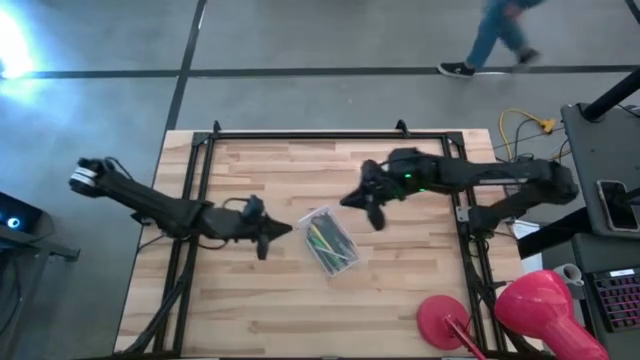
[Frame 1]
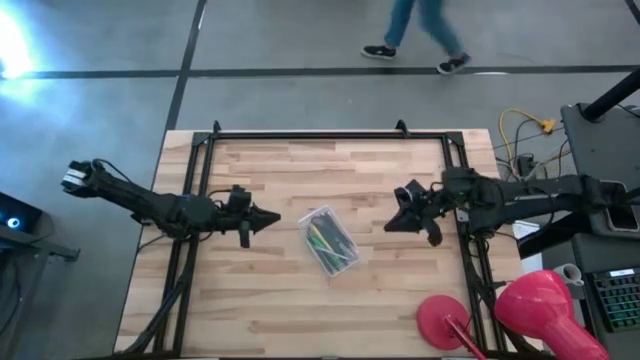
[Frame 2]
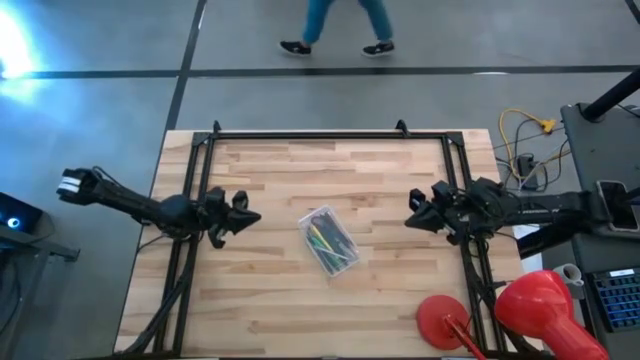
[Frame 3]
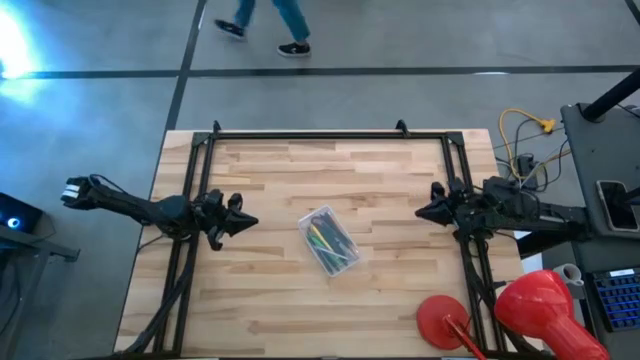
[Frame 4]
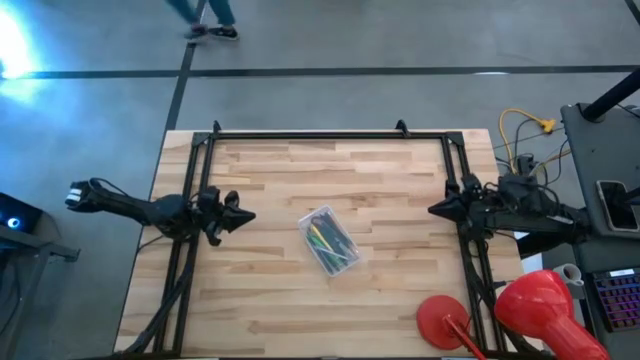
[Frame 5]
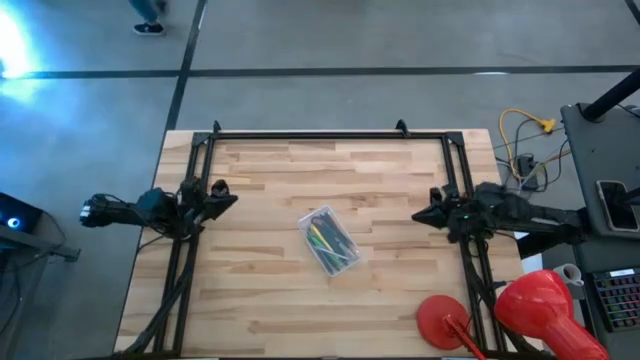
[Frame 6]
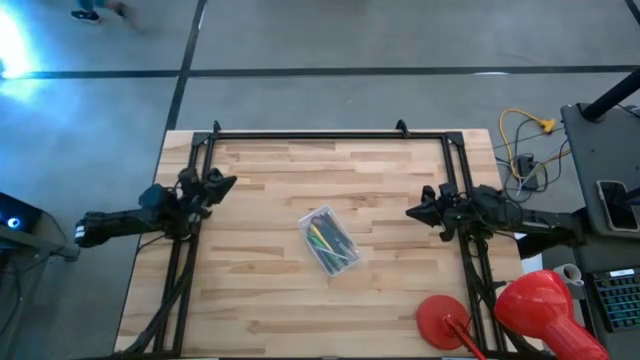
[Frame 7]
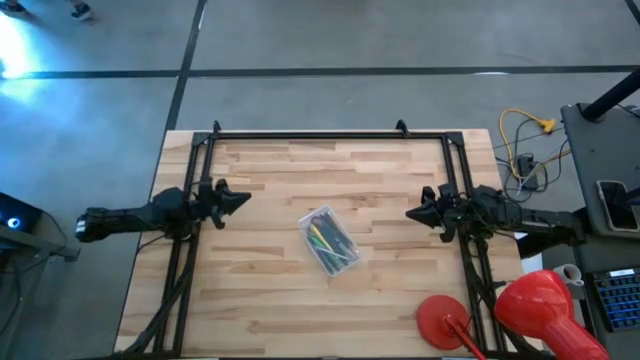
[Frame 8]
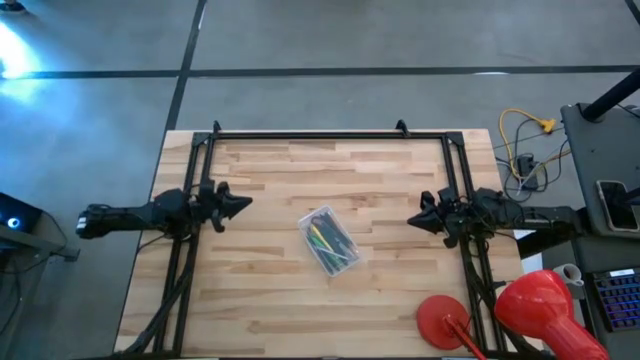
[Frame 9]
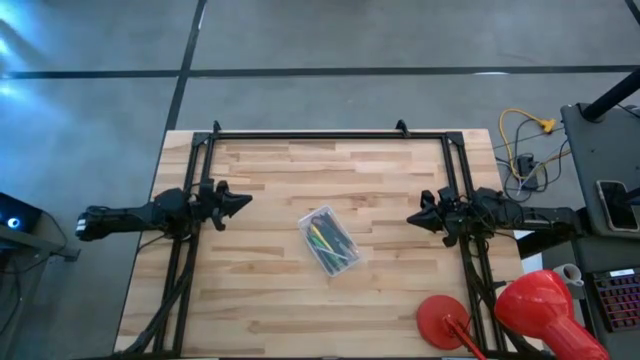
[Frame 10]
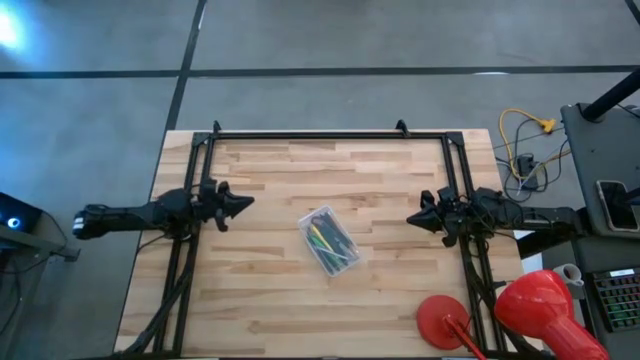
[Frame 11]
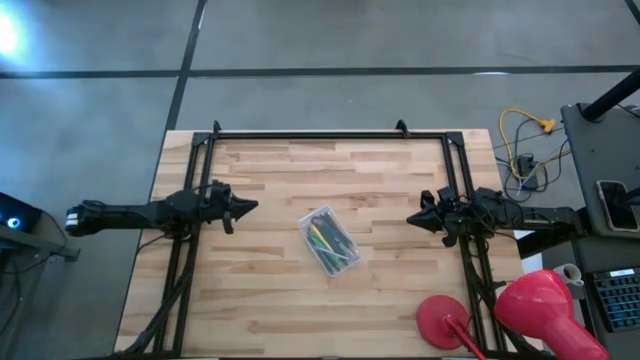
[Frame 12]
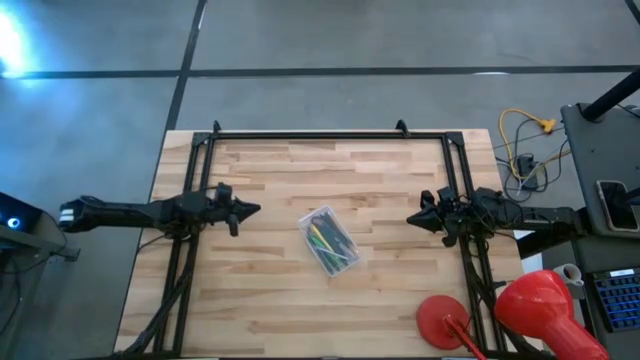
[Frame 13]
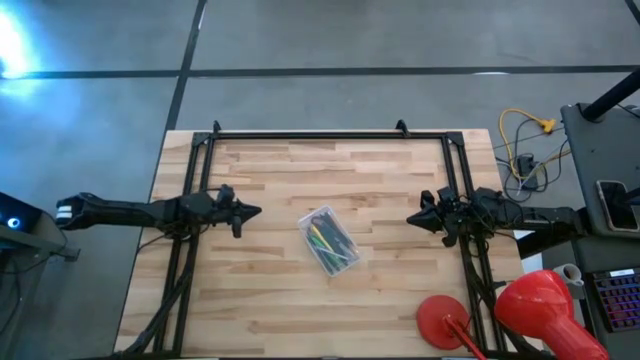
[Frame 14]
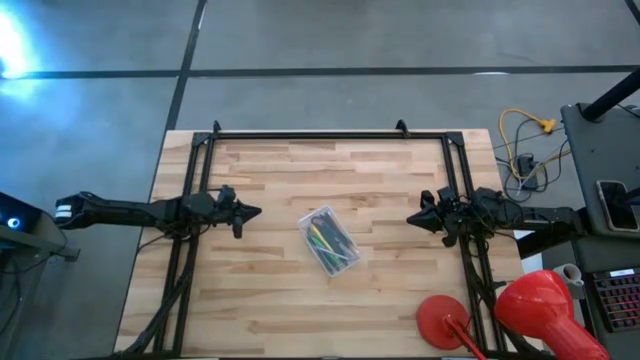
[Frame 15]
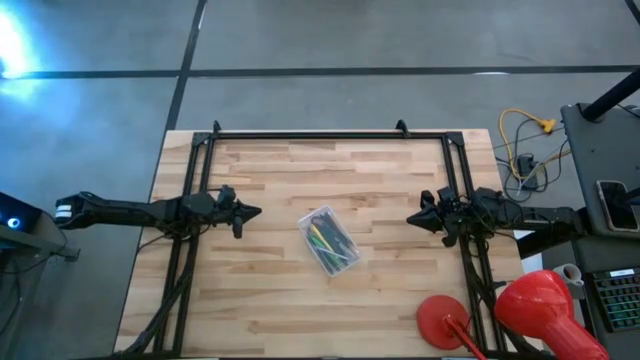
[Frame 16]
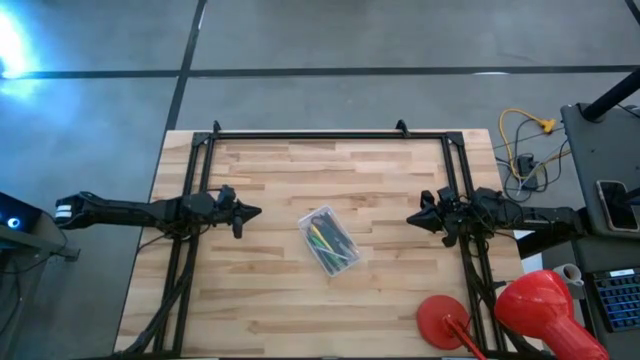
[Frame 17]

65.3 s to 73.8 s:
Task: Pick & place school supplies into a supply box
Return to Home Position

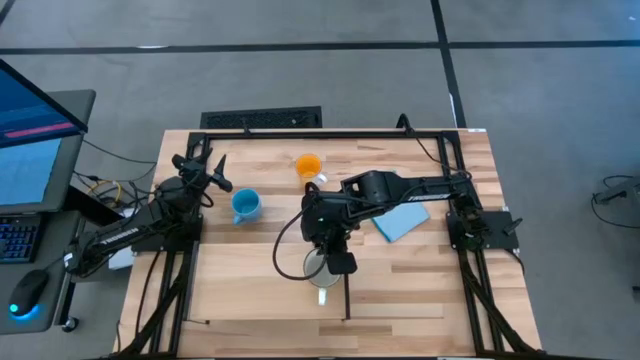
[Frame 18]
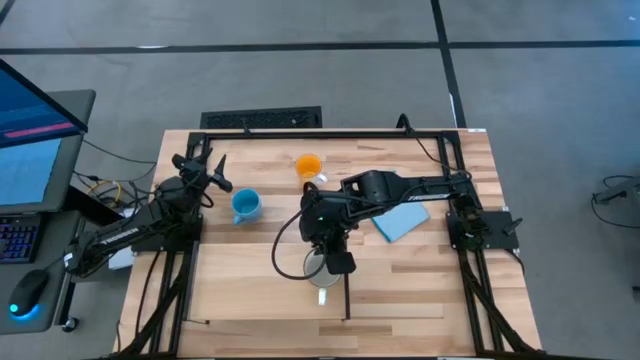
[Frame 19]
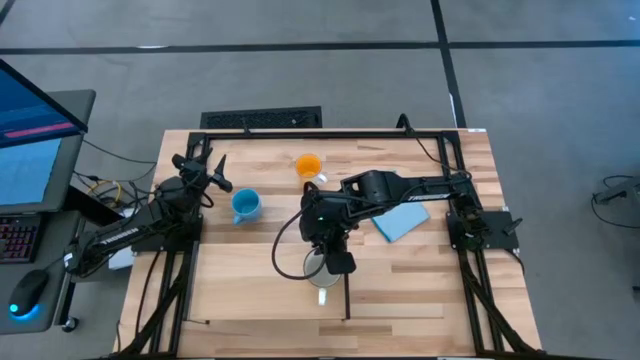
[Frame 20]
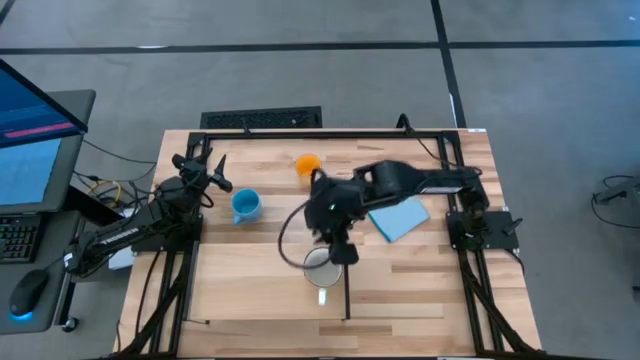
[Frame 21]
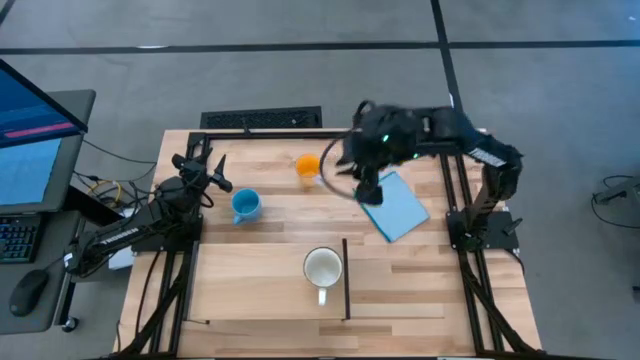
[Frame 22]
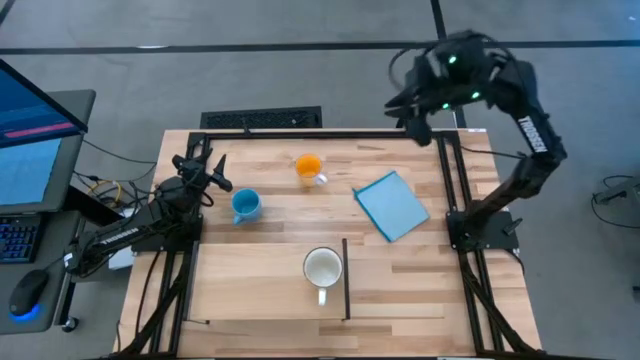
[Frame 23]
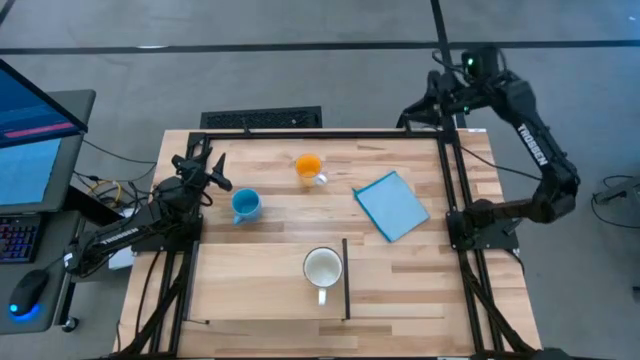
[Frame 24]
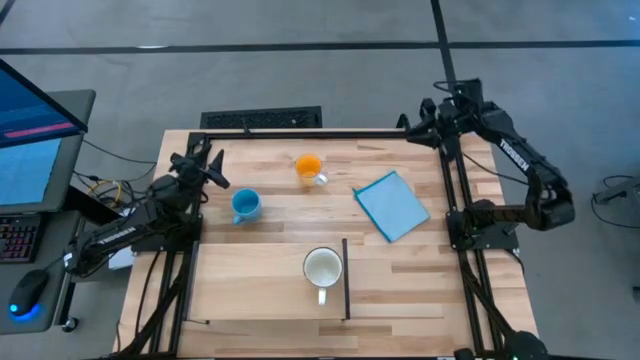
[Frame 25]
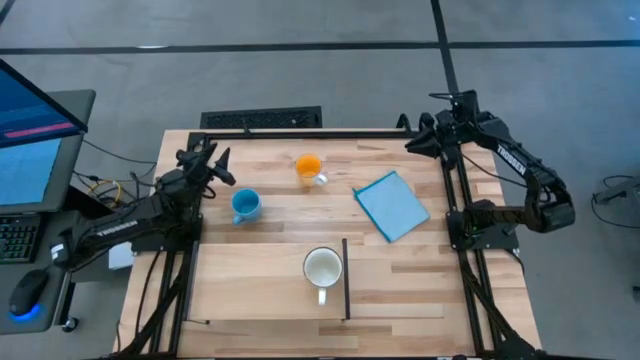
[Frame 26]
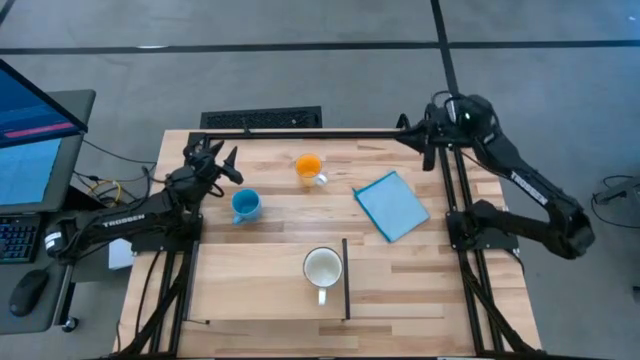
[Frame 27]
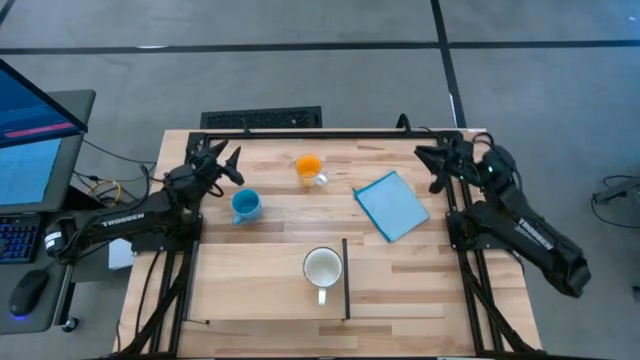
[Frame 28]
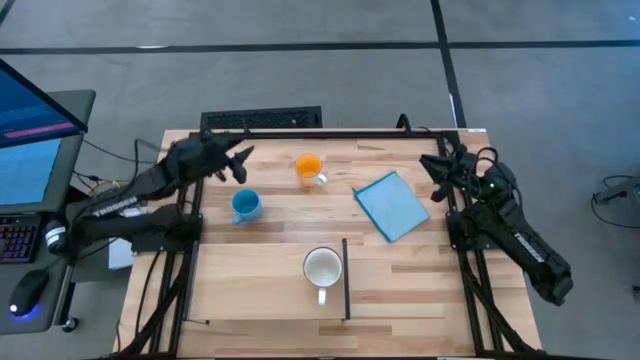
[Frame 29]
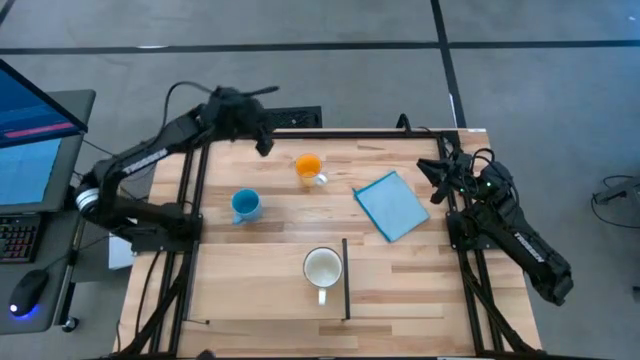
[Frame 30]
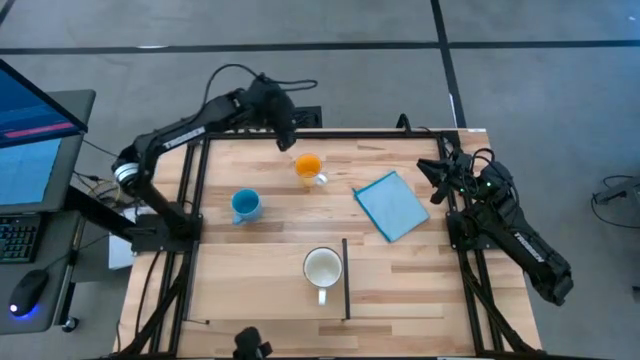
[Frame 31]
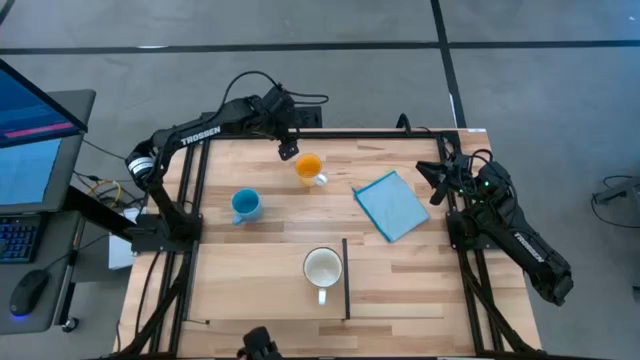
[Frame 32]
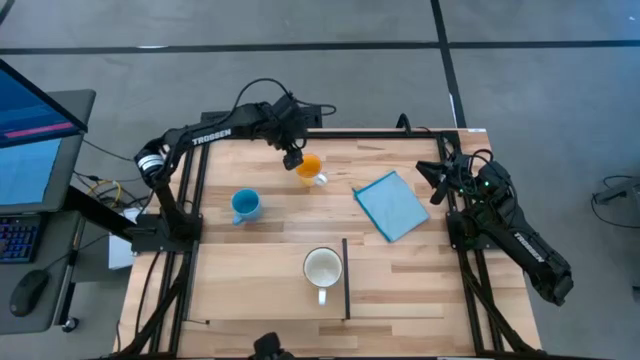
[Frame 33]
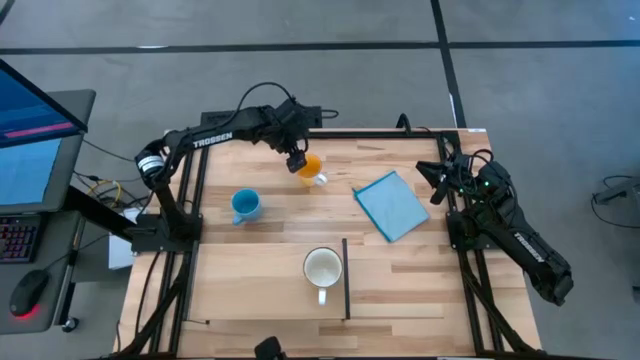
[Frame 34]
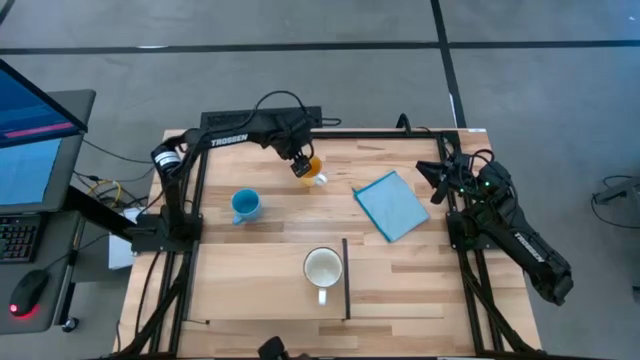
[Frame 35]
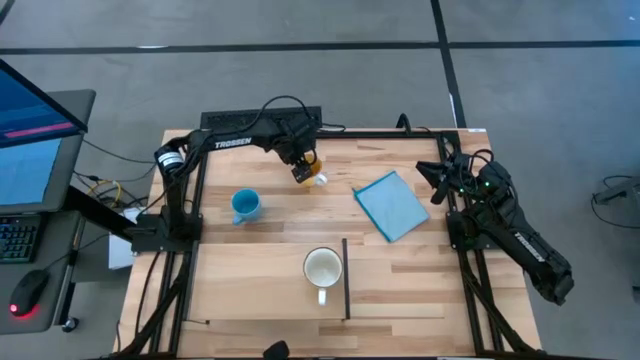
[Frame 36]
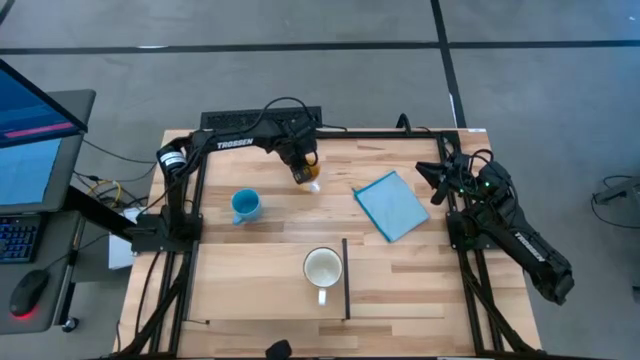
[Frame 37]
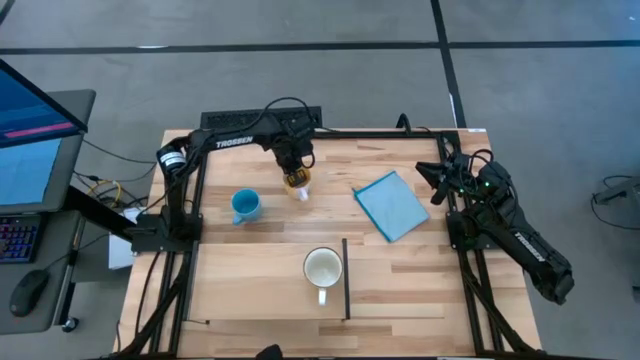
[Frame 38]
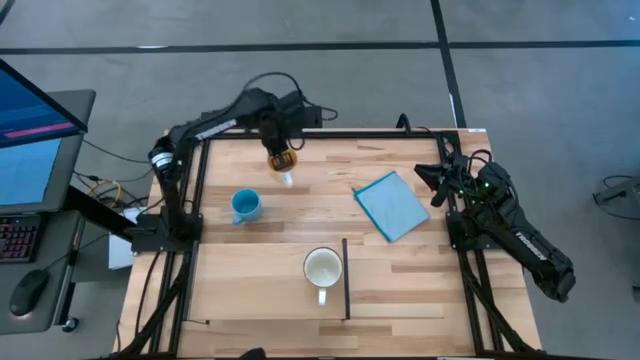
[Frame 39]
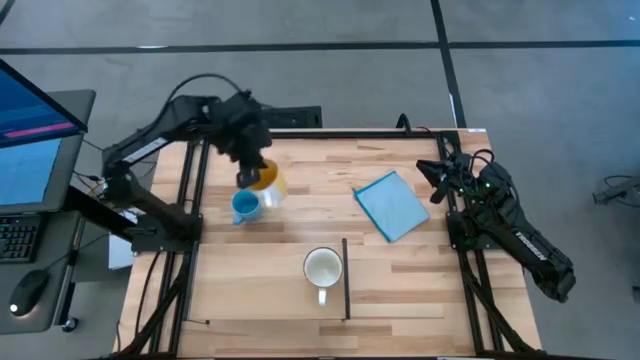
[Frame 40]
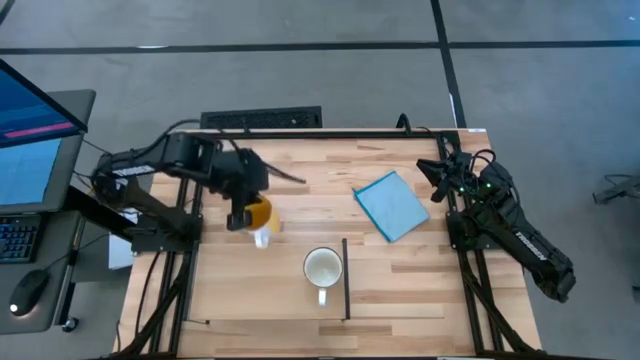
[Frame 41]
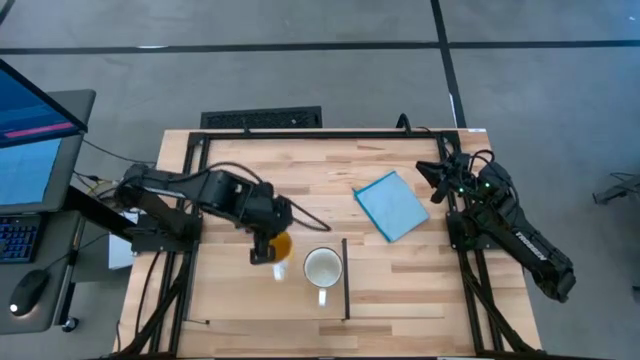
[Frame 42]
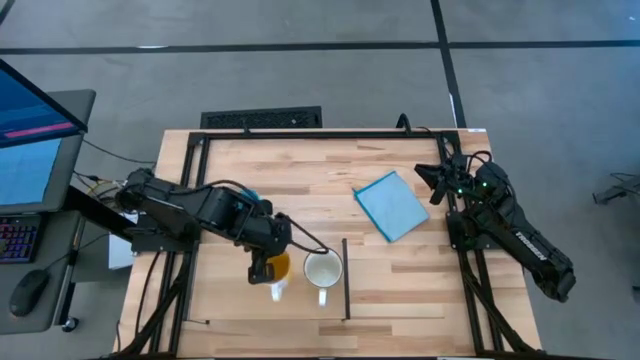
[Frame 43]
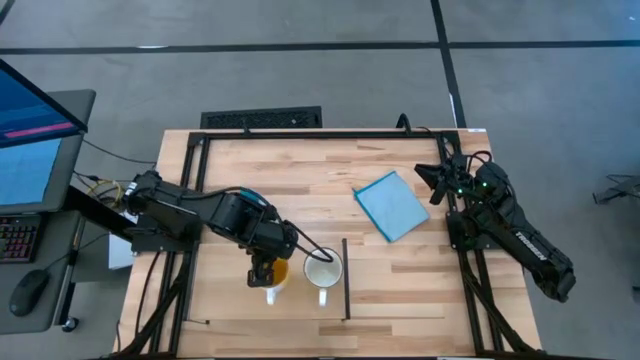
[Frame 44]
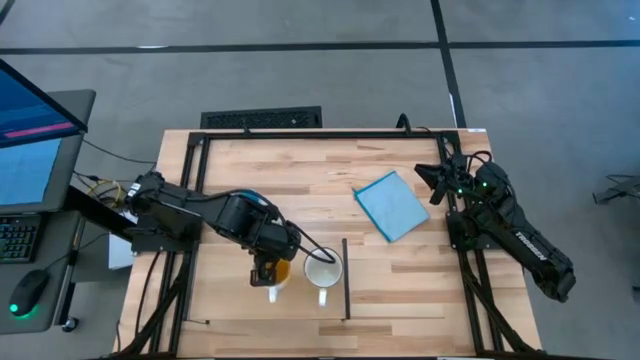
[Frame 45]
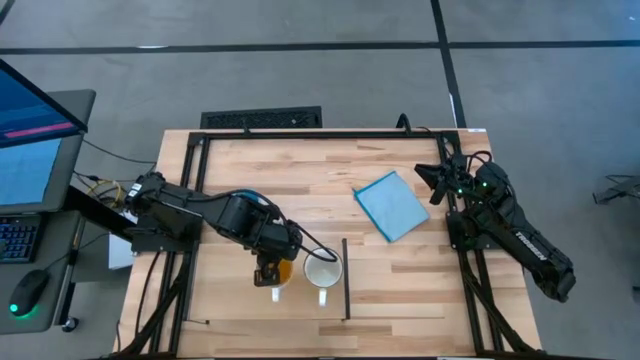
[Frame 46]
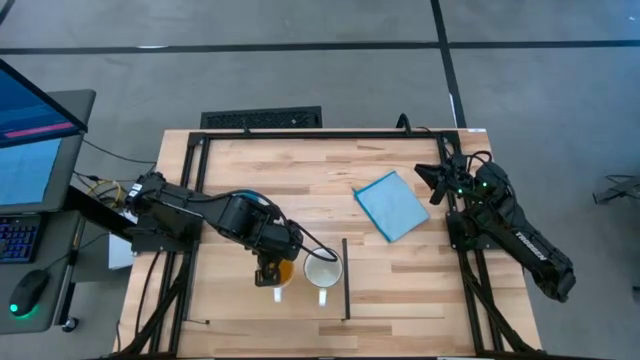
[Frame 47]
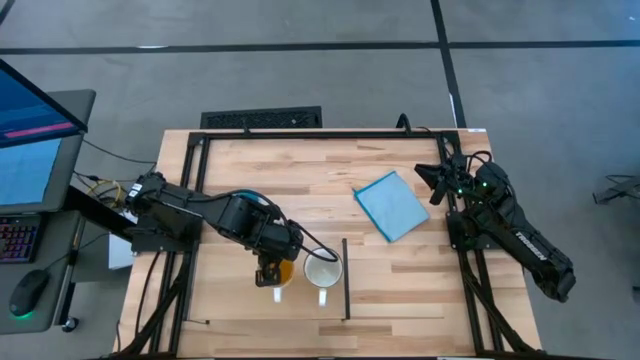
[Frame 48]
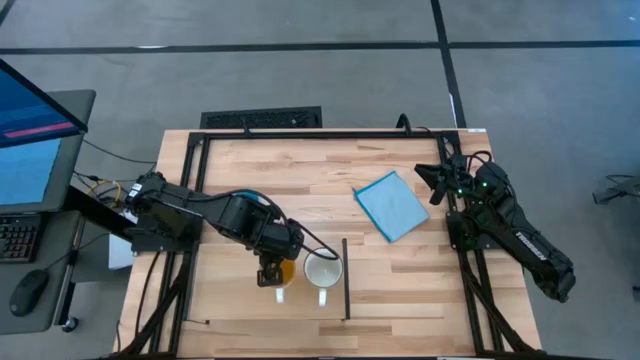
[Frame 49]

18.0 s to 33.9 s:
Task: Stack small to large cups/mugs on shelf
Put the orange mug on the shelf
